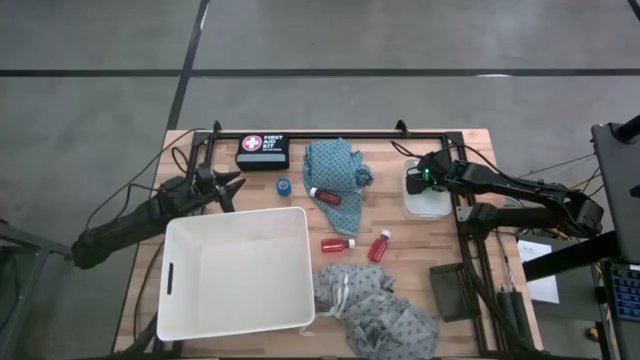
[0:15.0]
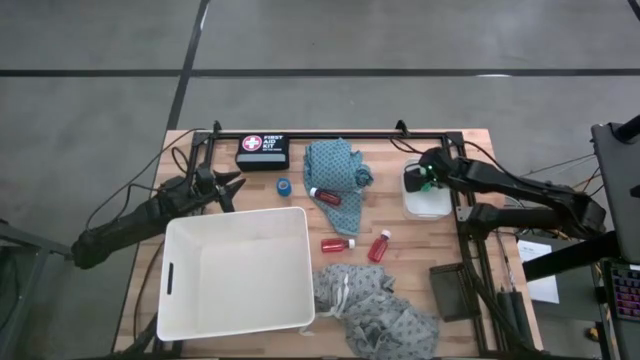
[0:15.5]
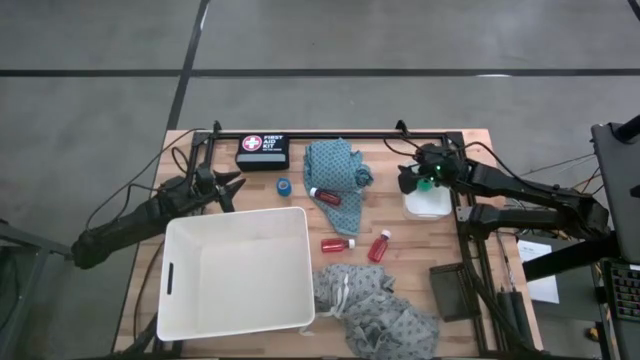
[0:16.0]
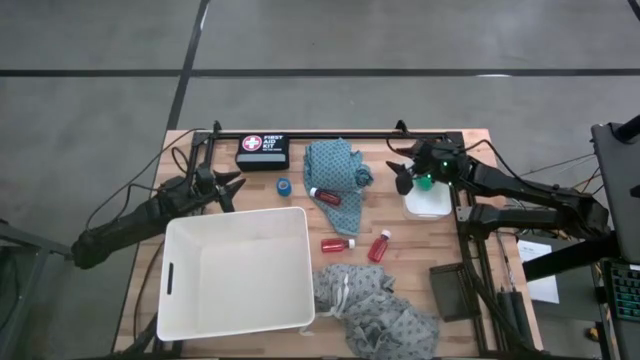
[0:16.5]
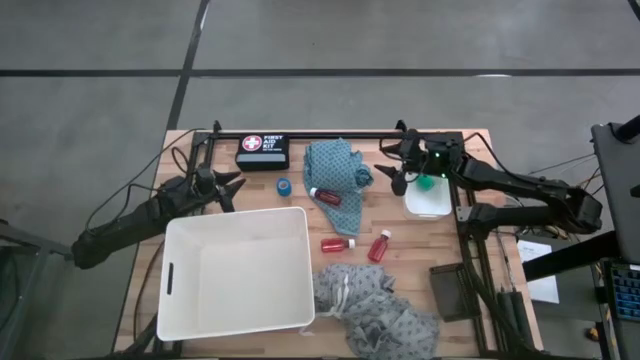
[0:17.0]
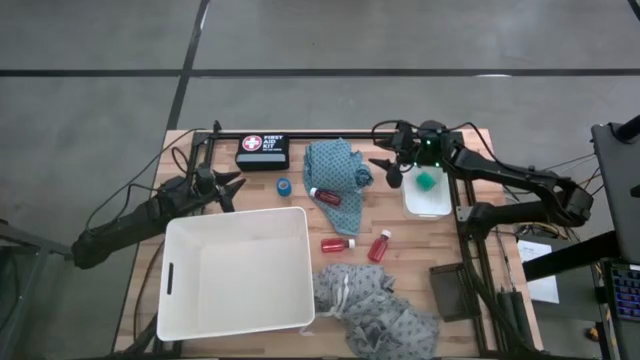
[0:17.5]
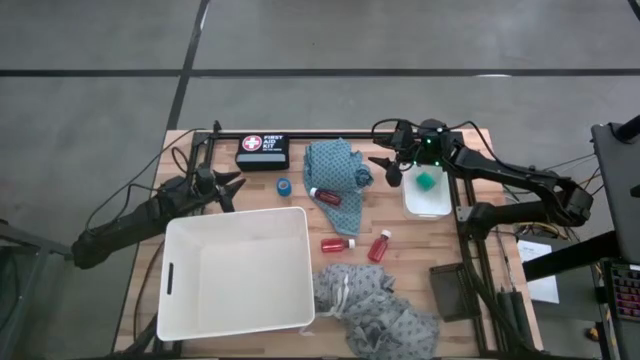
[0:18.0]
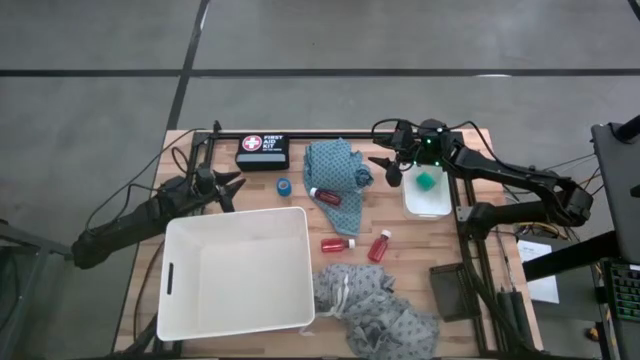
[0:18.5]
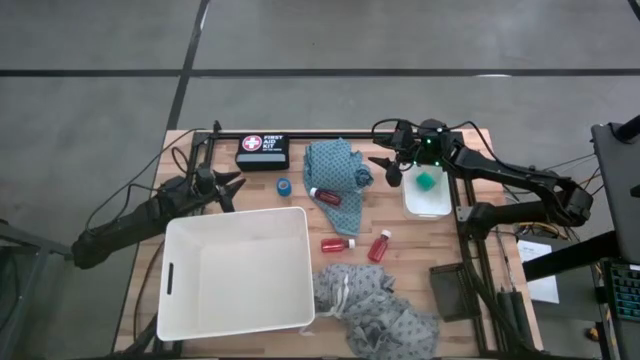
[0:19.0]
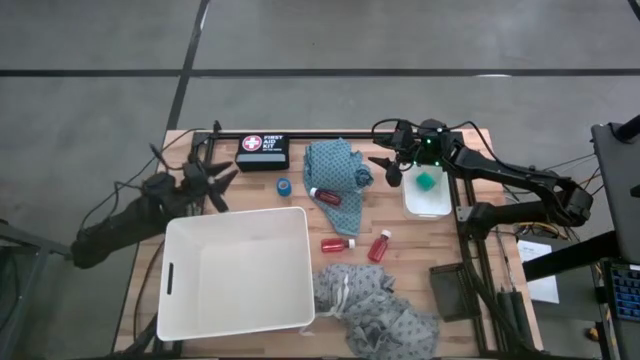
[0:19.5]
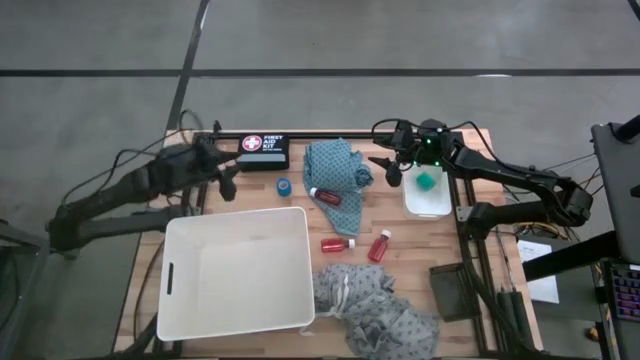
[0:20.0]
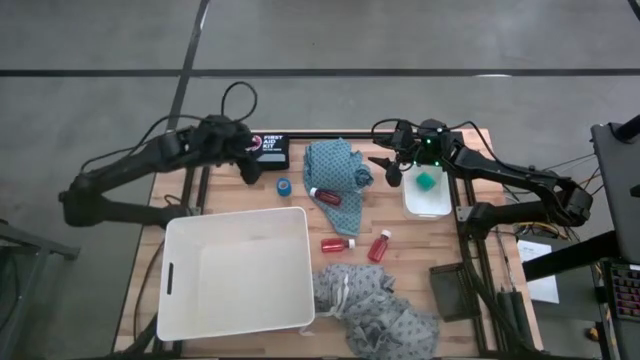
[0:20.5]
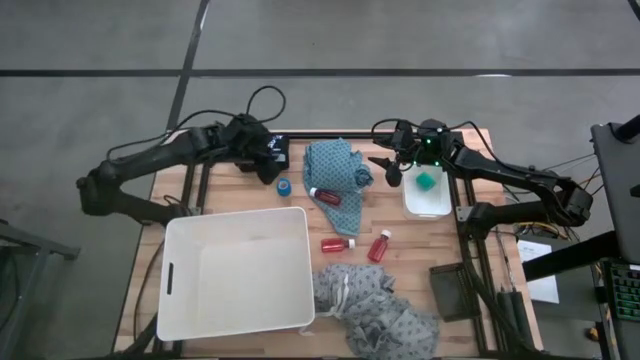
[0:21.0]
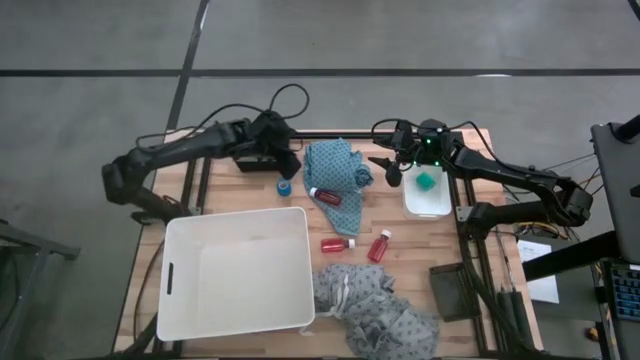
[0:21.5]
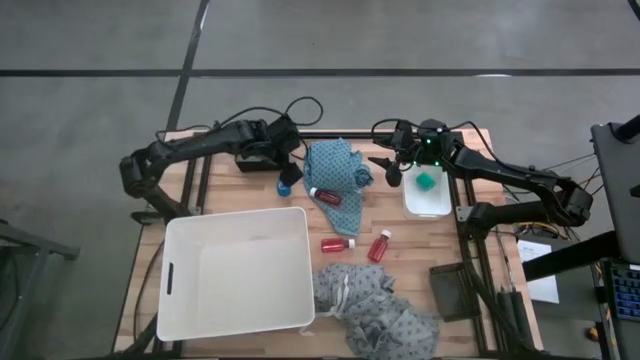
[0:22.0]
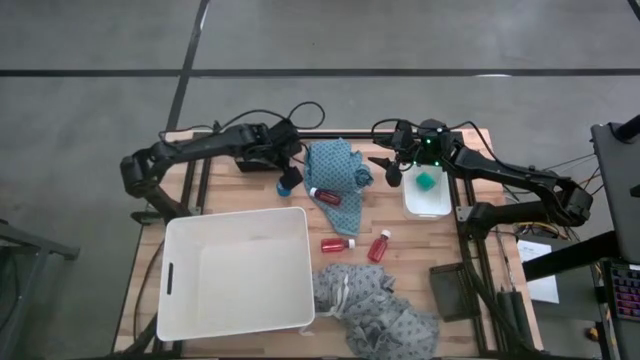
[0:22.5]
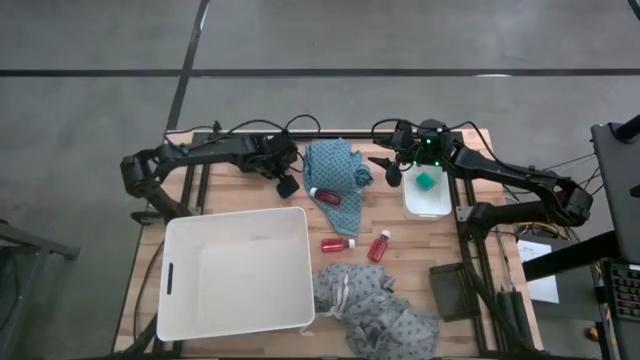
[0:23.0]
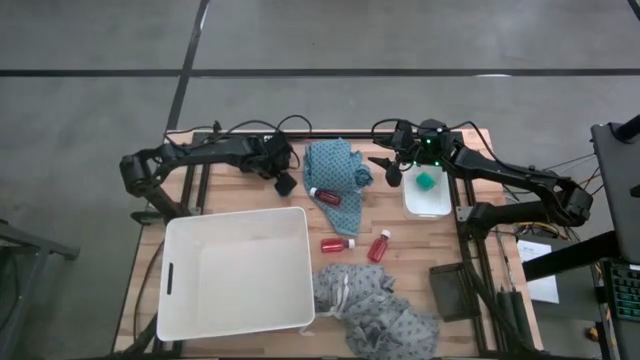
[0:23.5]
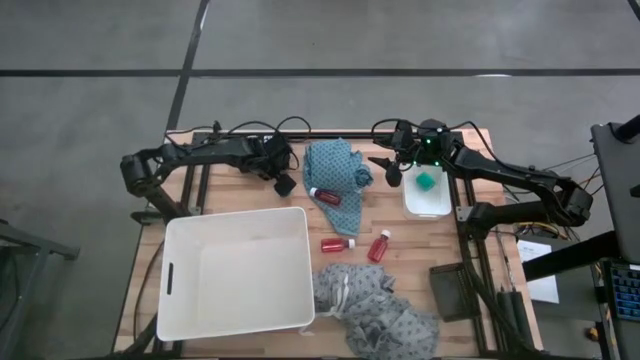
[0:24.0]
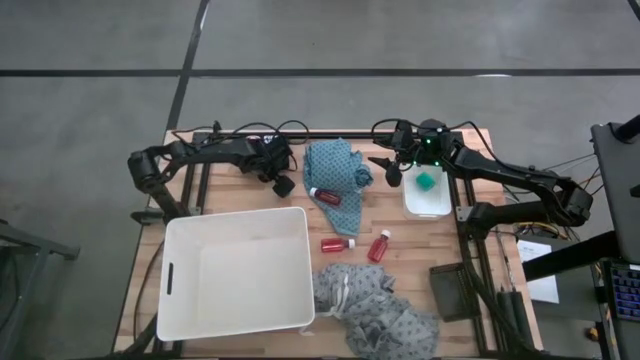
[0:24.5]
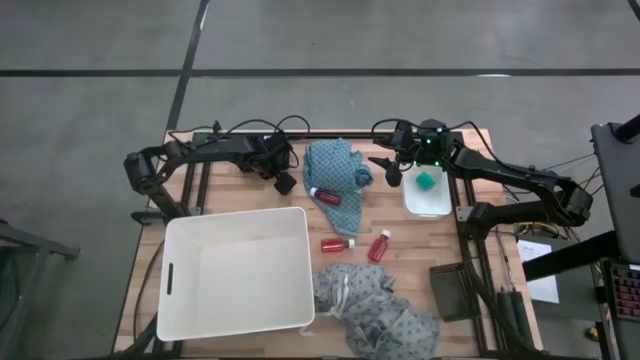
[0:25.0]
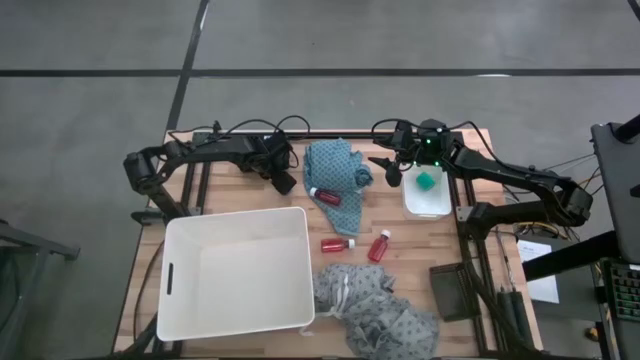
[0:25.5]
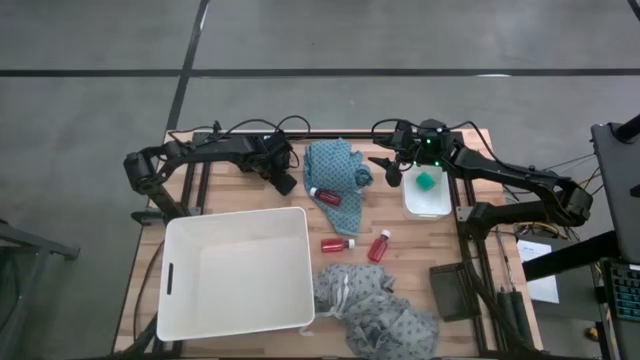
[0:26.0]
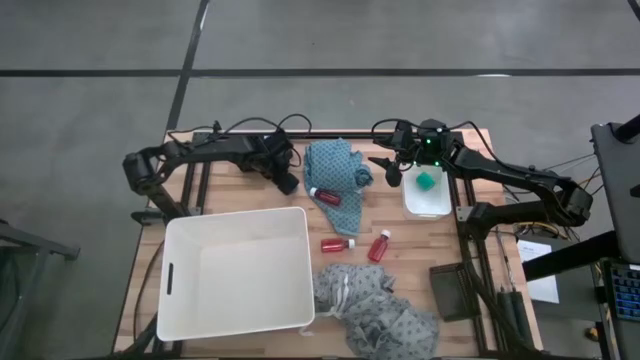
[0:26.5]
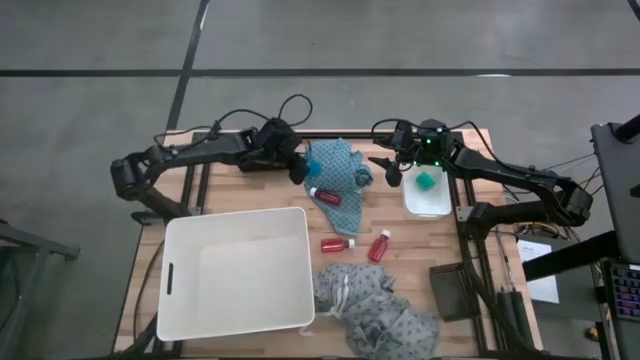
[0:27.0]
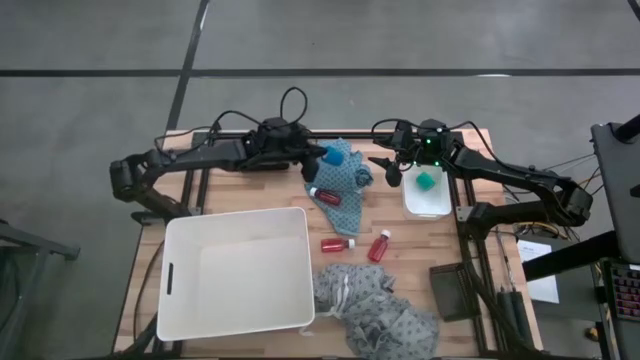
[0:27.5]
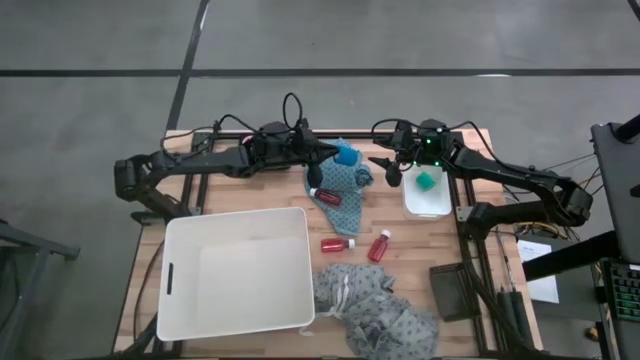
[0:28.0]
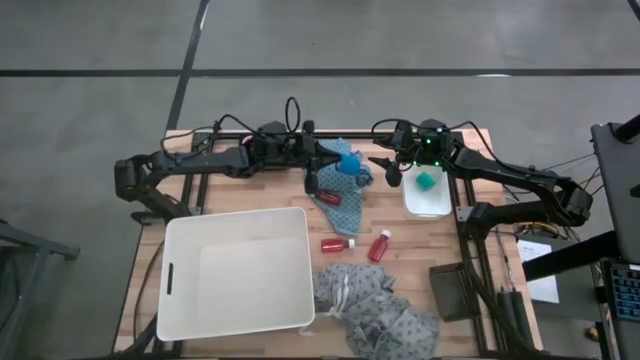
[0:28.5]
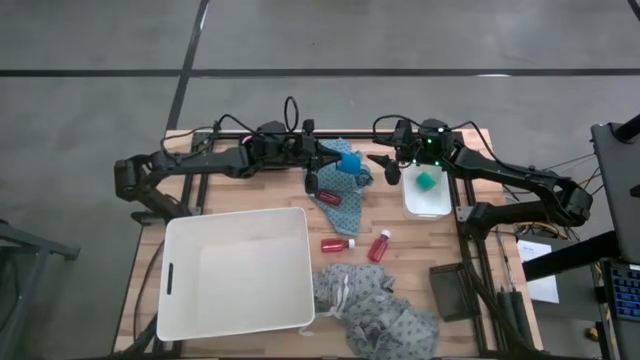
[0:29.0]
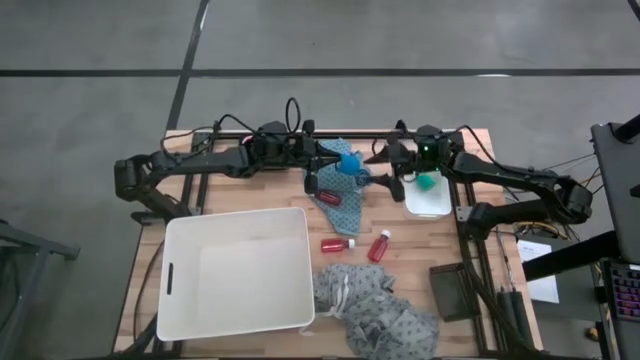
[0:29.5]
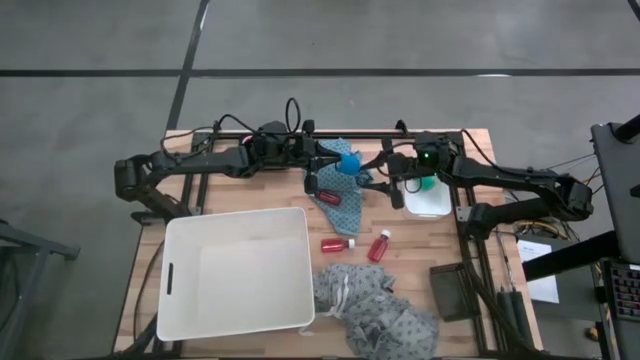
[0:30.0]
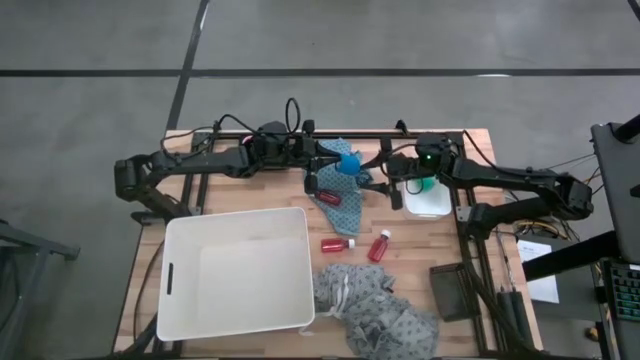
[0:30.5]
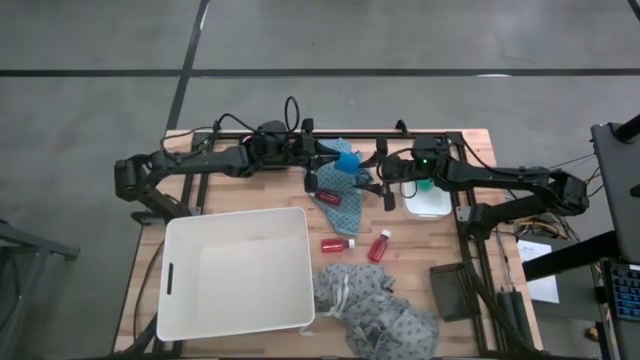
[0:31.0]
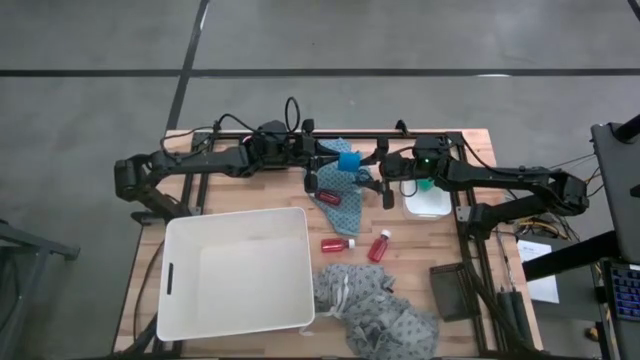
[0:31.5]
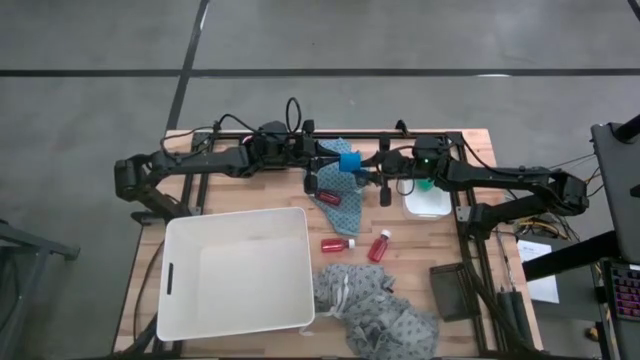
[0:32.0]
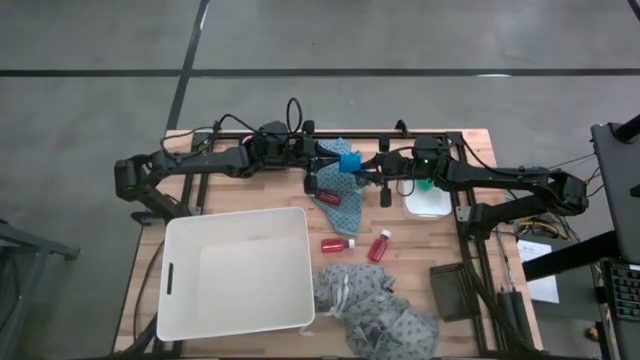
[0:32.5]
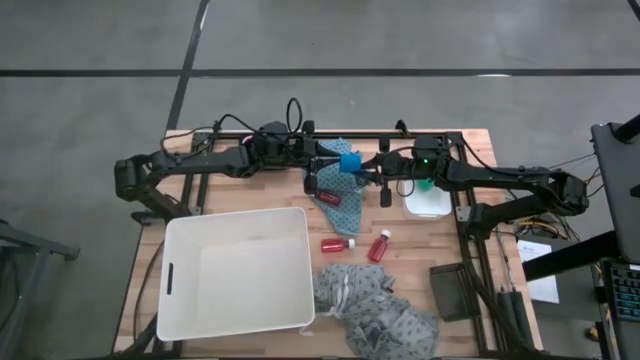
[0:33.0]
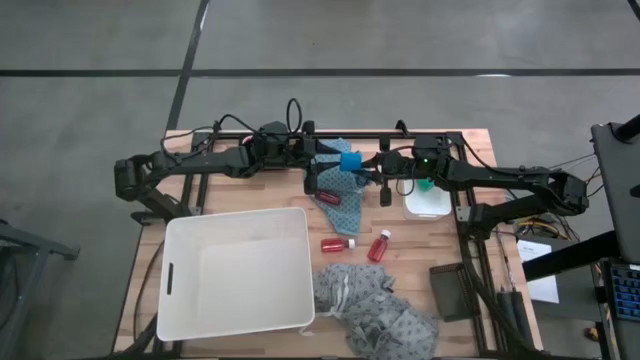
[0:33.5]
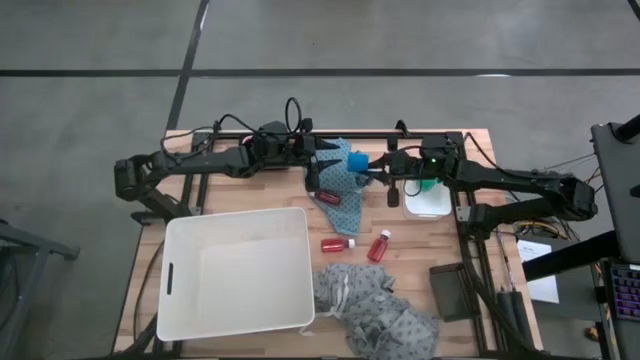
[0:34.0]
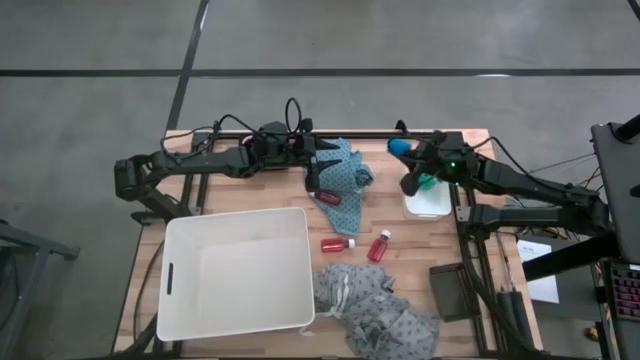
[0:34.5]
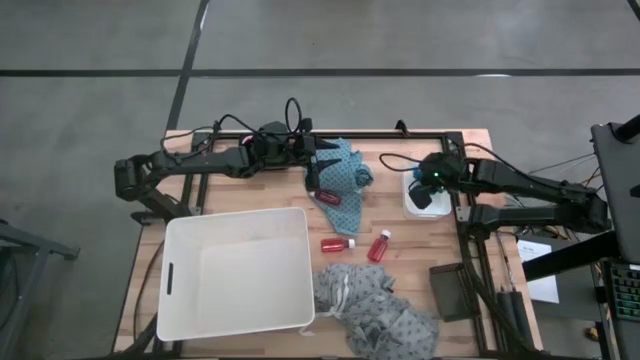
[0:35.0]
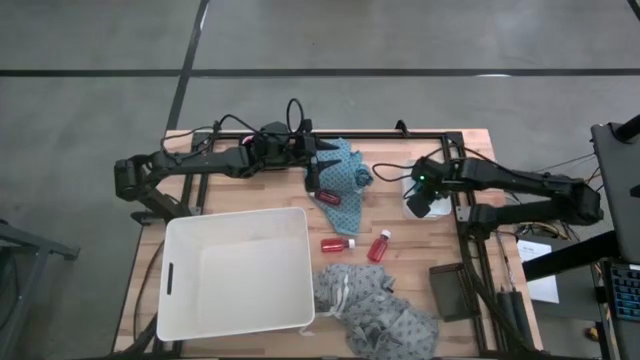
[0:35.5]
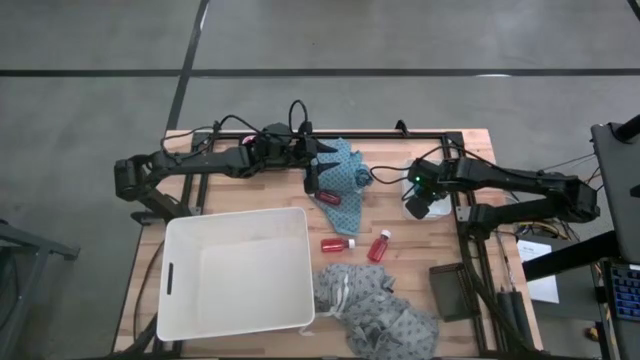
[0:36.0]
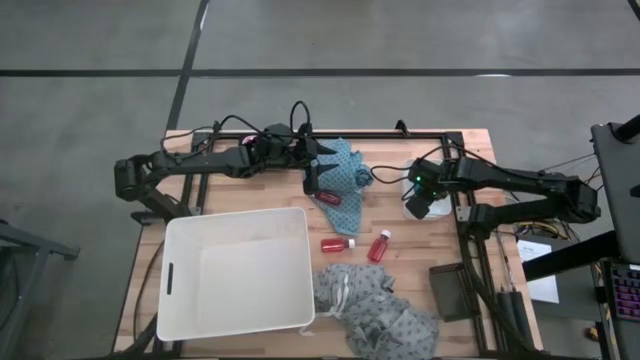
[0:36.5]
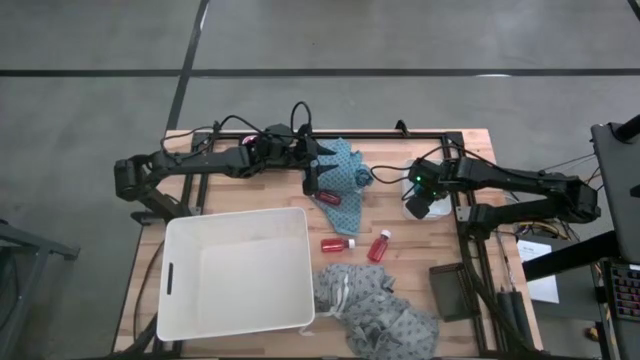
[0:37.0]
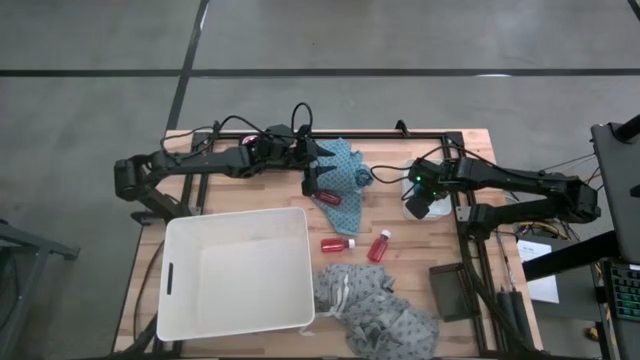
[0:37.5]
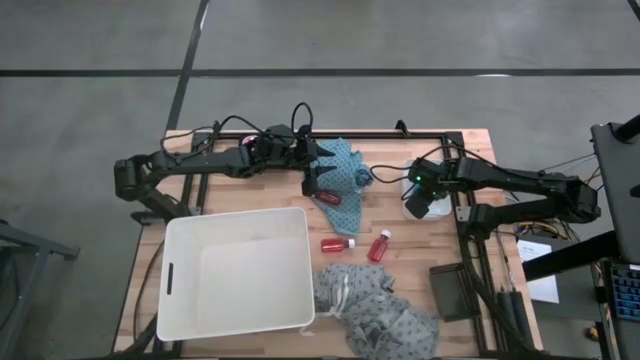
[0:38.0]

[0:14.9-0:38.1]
Task: Pick & Place Medicine items
Put the blue bandage into the small white bin
